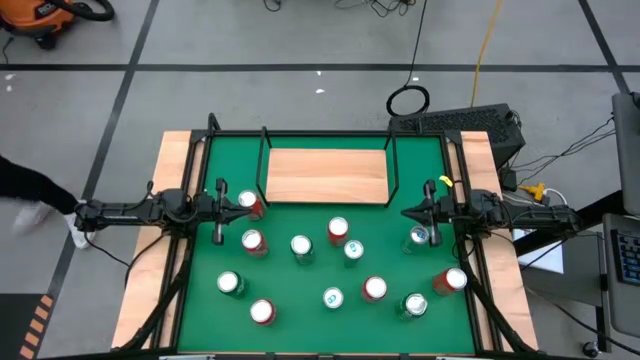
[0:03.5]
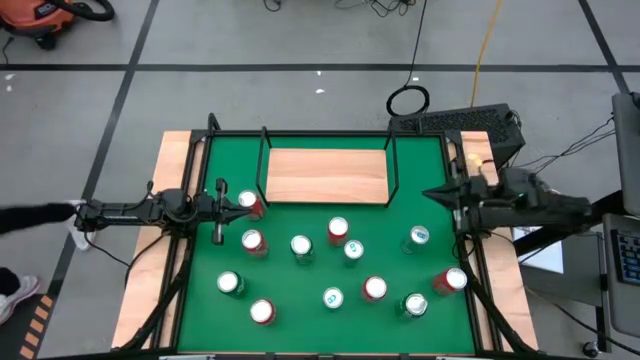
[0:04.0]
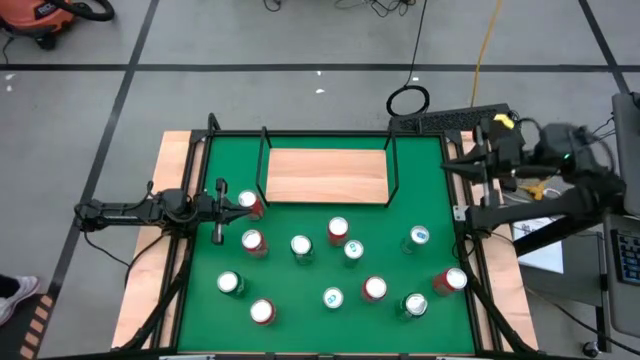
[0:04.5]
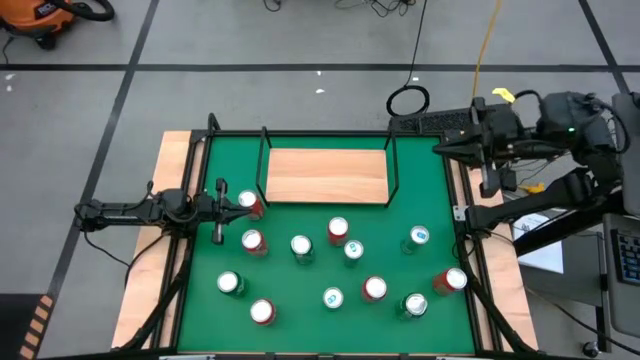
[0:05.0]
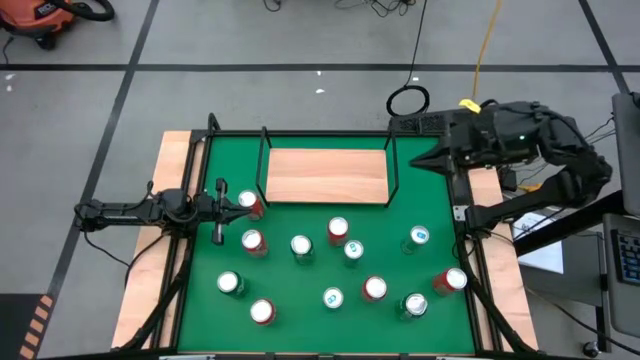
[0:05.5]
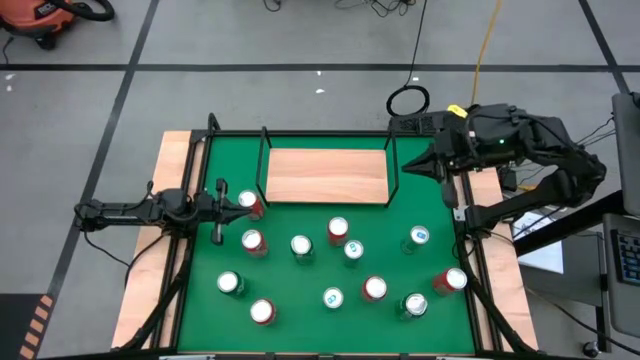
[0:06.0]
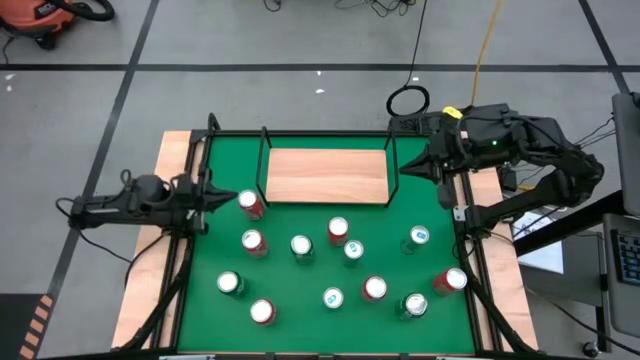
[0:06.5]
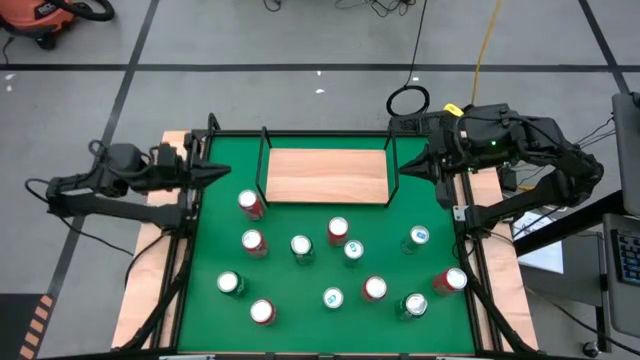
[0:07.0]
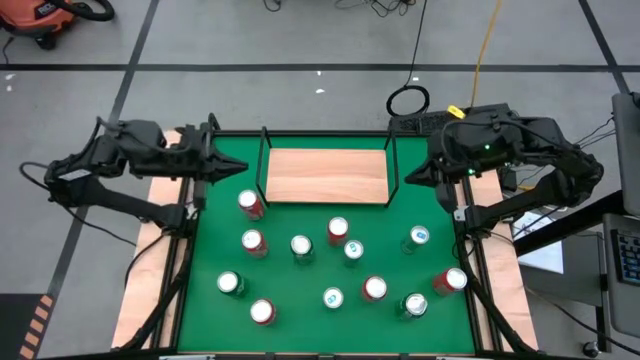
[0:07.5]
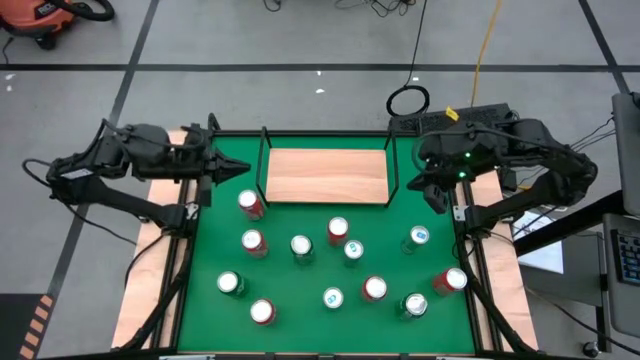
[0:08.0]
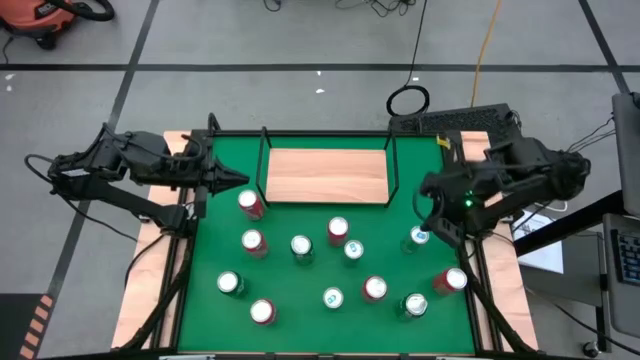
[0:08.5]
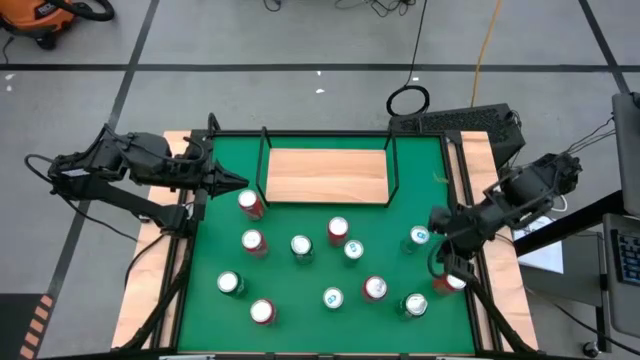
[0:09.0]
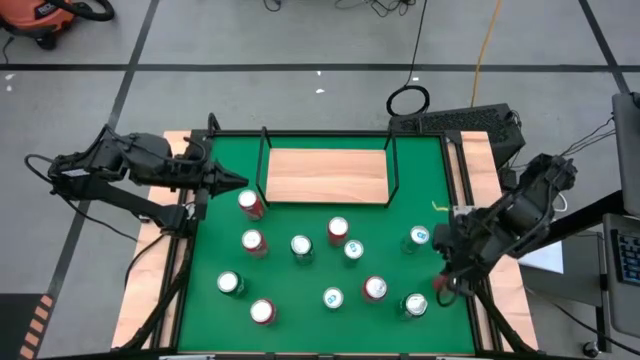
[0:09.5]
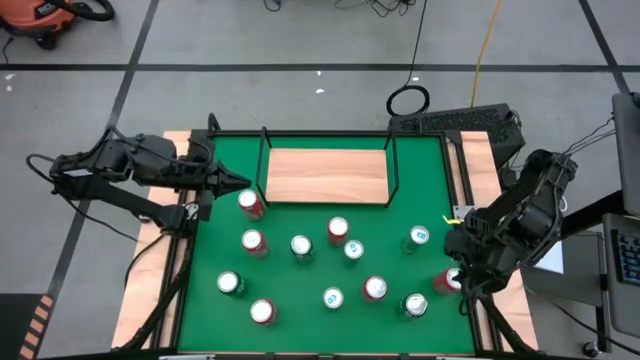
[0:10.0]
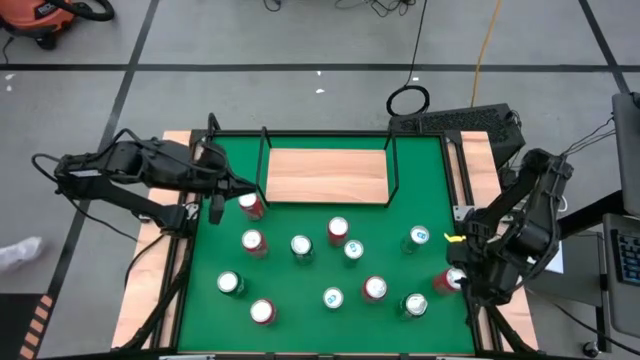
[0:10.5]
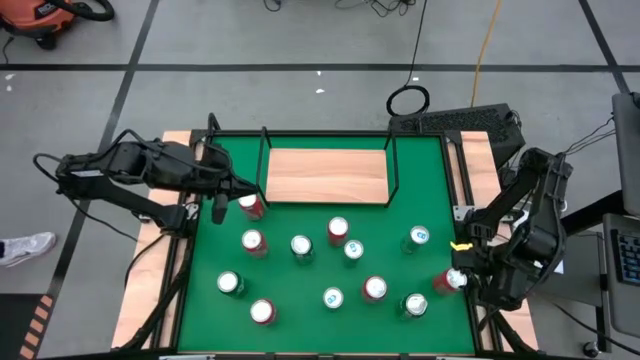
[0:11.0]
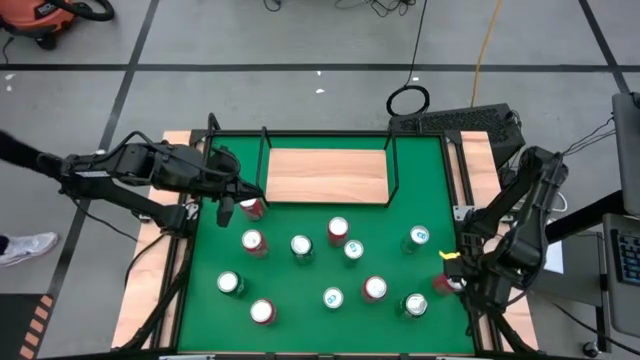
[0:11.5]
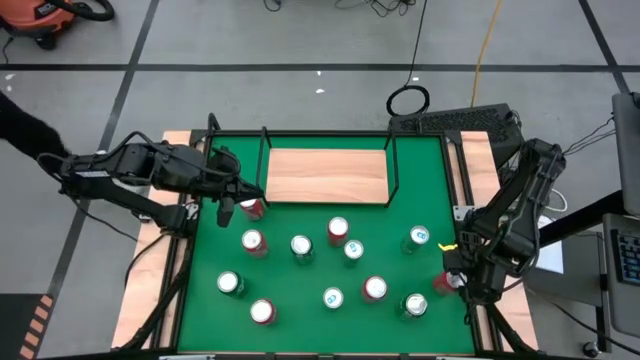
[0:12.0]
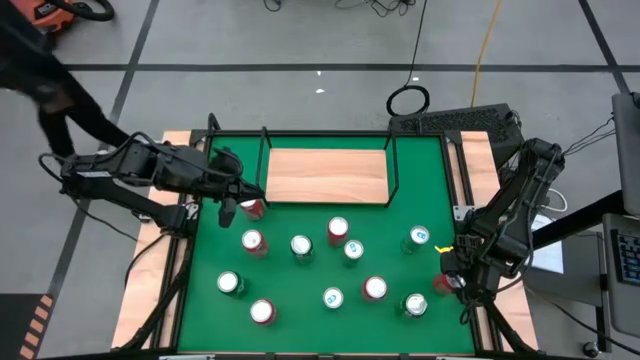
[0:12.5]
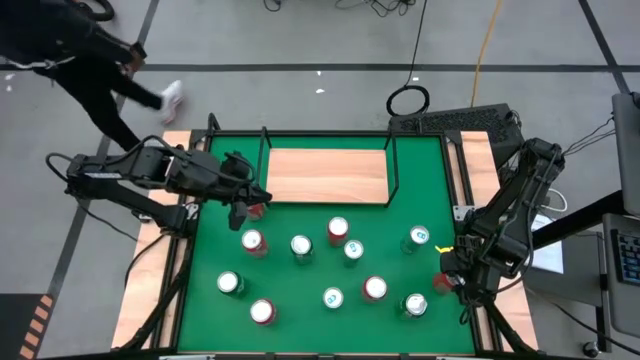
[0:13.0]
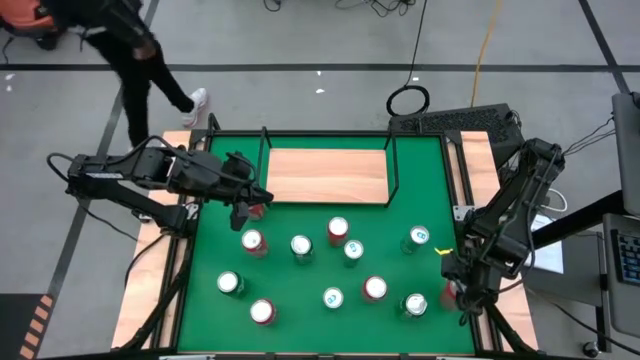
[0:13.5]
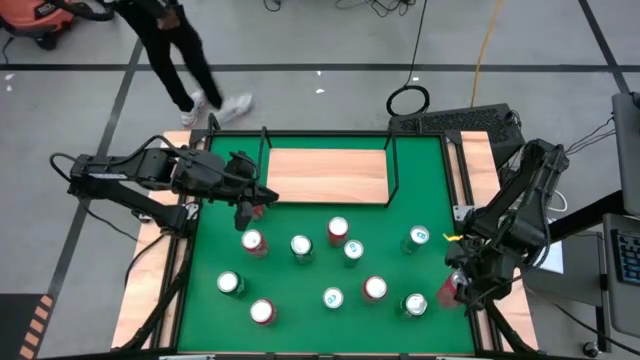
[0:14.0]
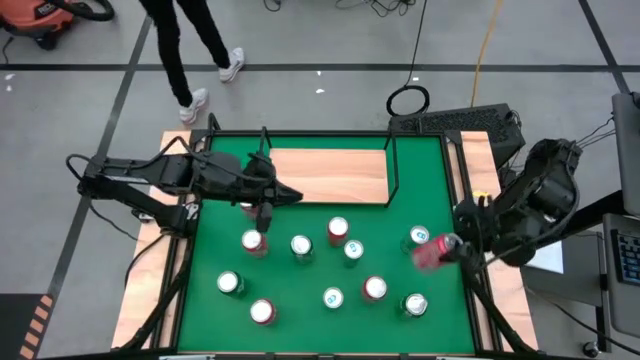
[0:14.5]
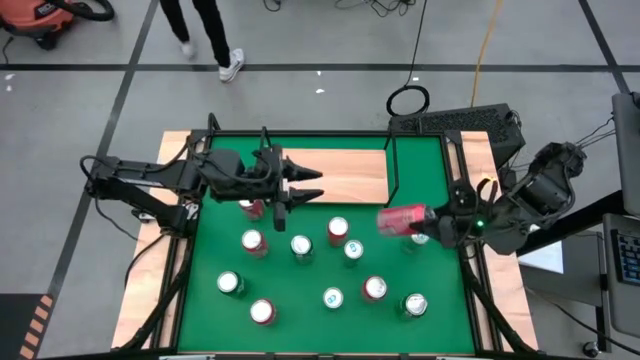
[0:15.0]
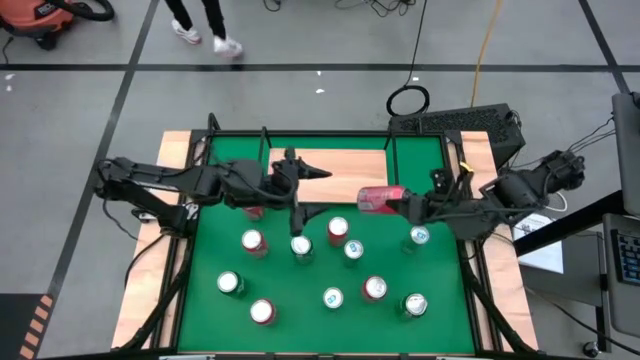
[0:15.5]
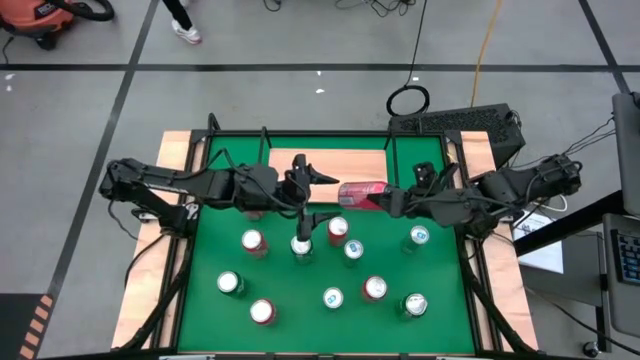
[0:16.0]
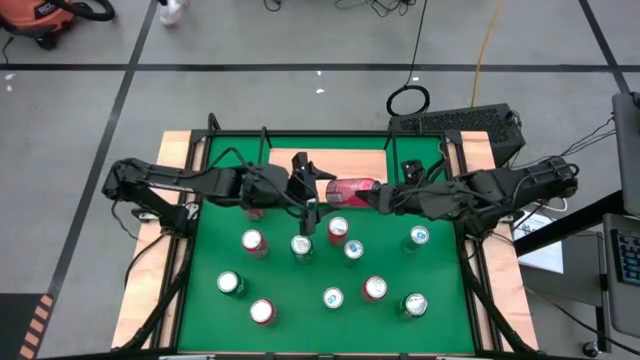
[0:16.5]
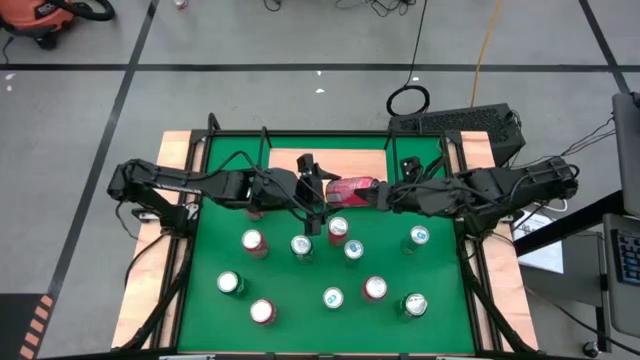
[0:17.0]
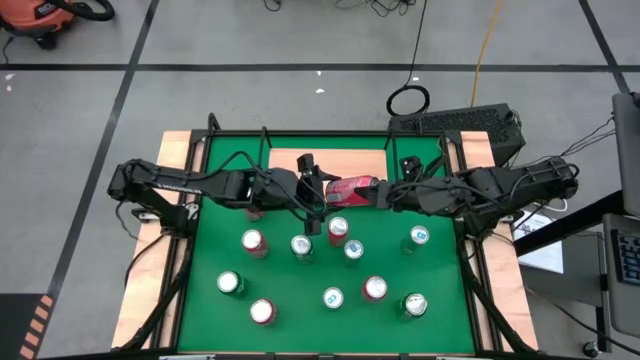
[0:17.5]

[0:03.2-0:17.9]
Task: Place canned beverage on shelf
Put the red soda can on the shelf

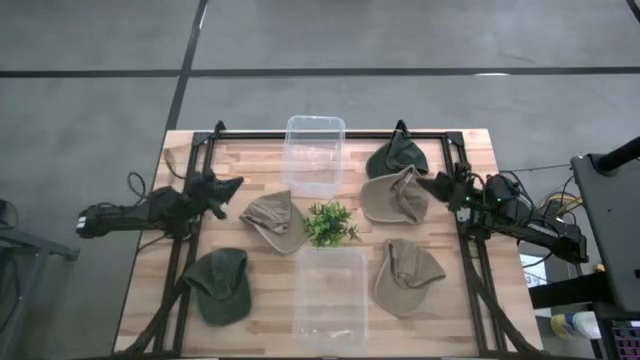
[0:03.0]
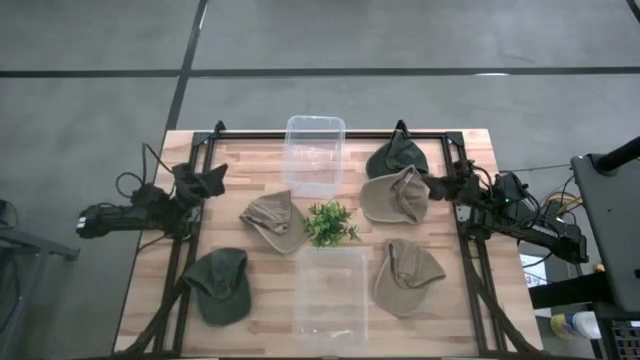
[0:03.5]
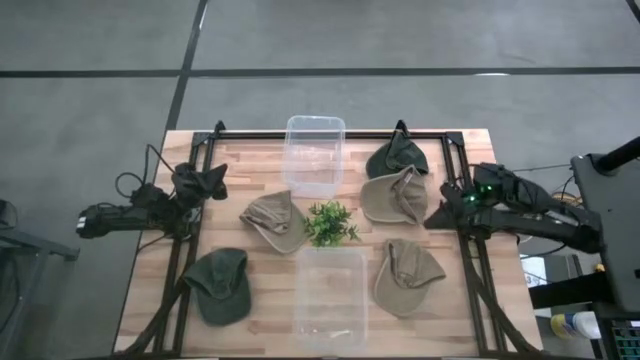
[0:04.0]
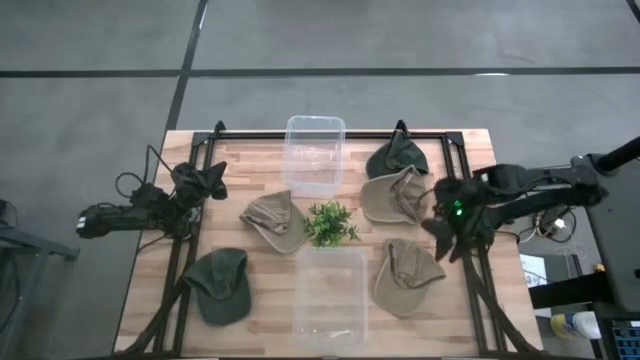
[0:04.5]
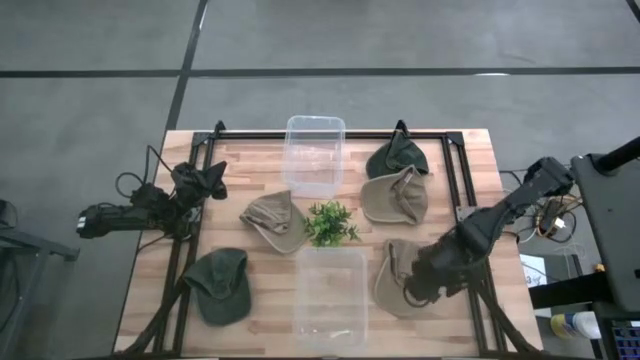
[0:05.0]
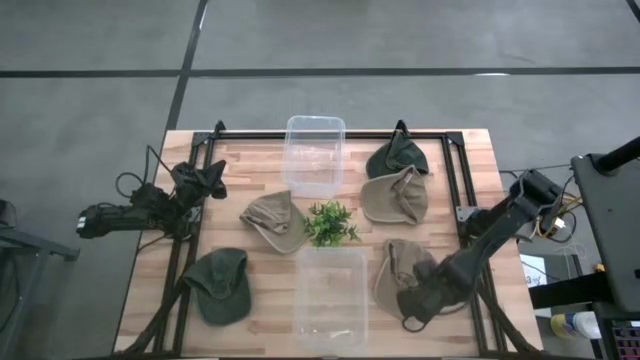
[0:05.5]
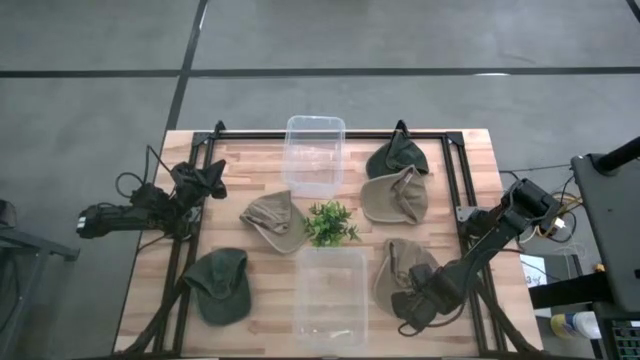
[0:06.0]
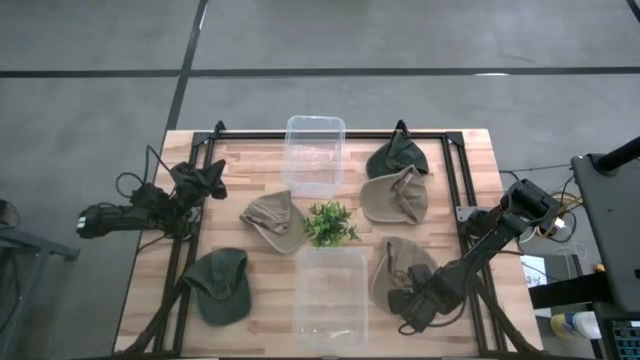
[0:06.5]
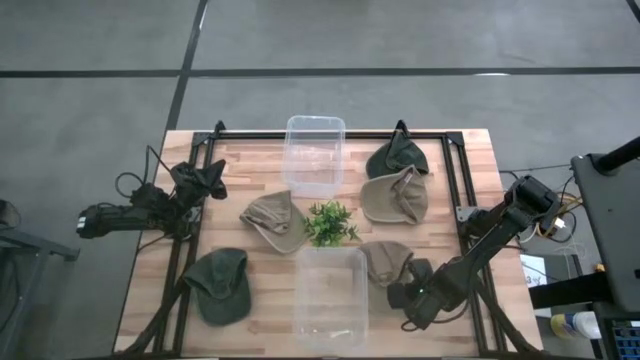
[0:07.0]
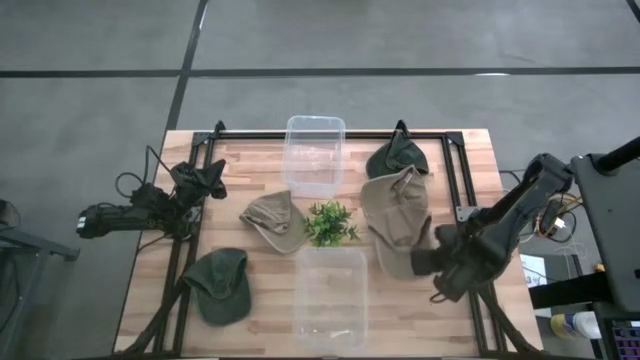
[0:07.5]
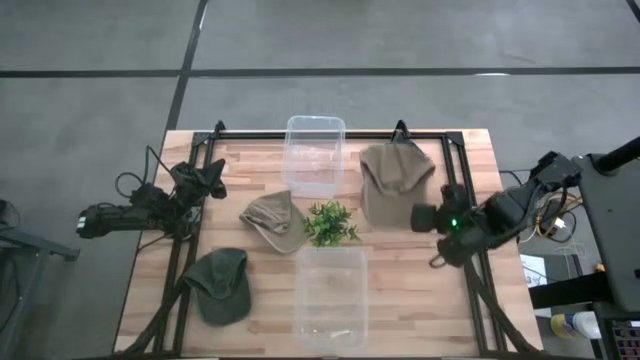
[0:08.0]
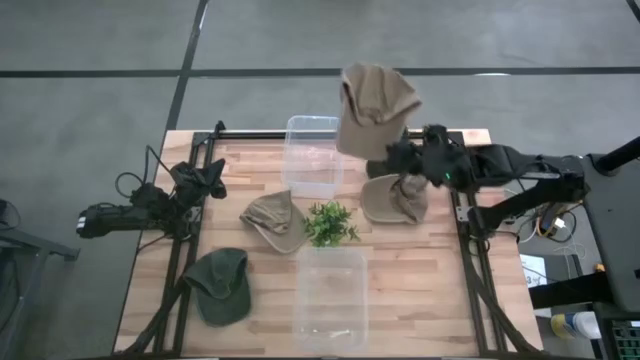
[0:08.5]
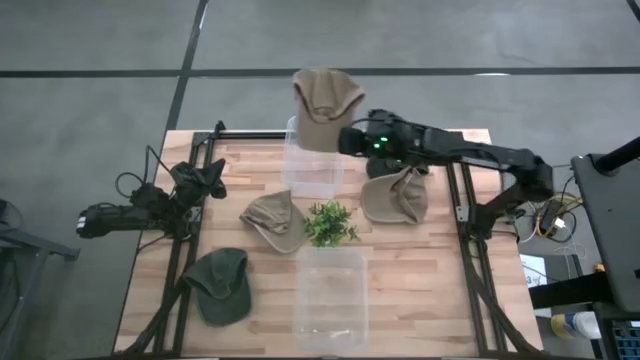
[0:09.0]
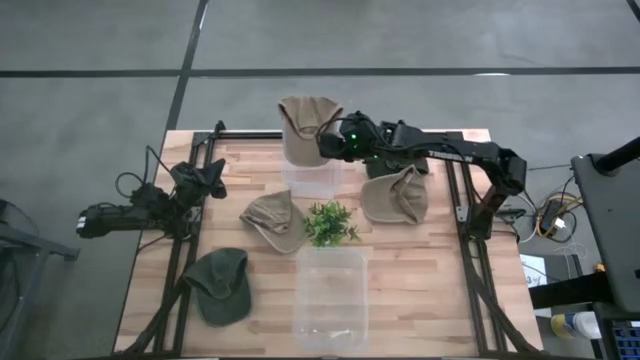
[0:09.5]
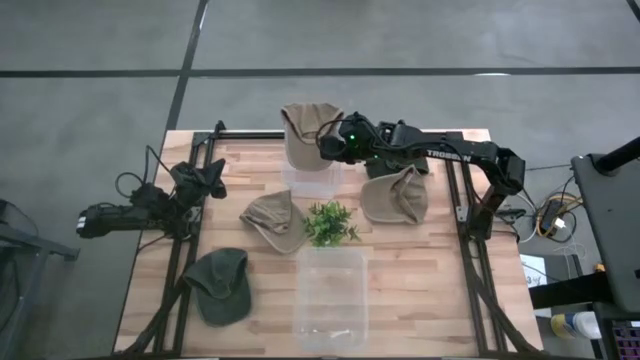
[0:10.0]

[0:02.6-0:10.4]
Task: Pick & Place hat
Put the bottom brown cap into the top transparent bin
